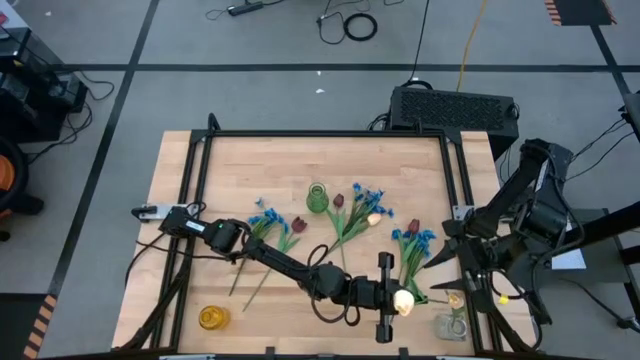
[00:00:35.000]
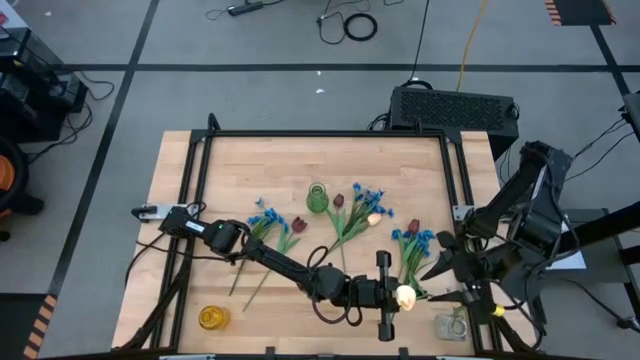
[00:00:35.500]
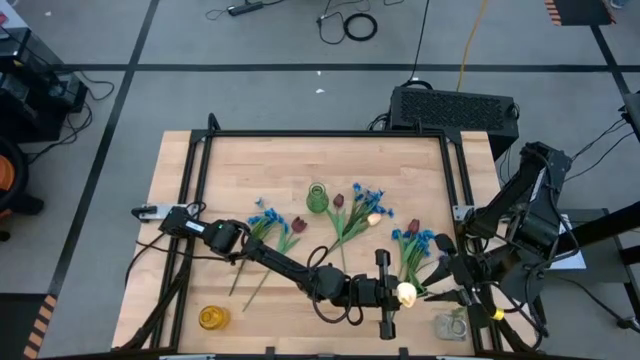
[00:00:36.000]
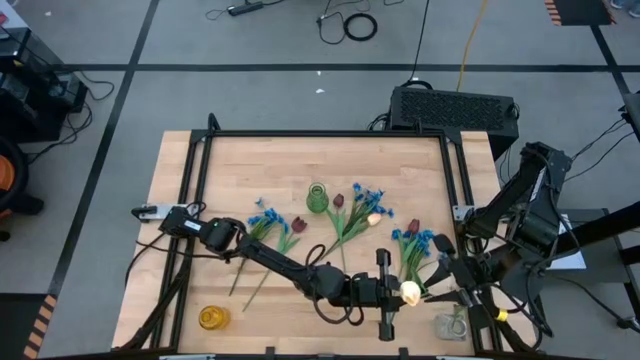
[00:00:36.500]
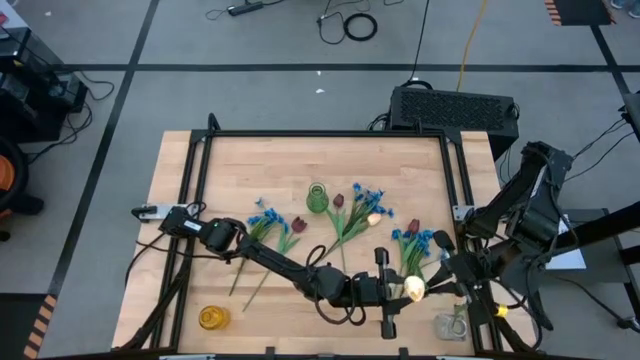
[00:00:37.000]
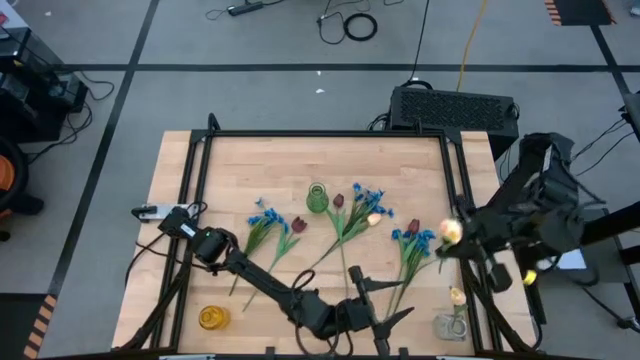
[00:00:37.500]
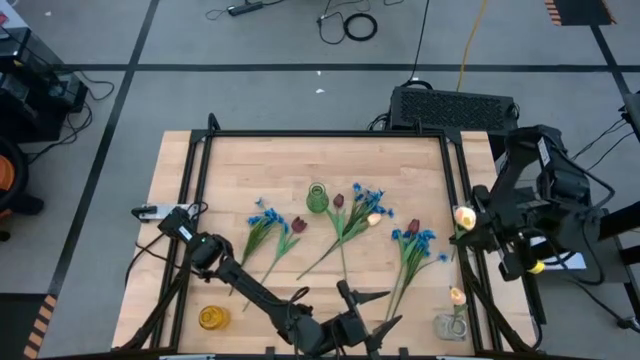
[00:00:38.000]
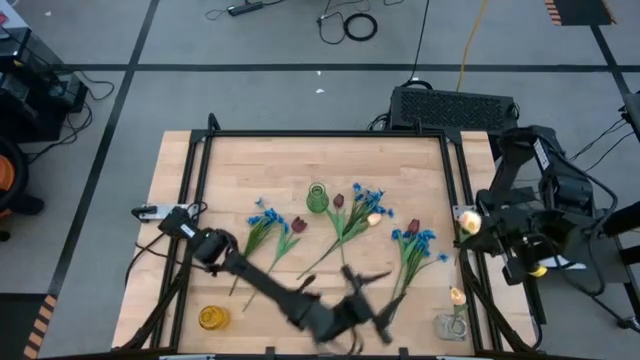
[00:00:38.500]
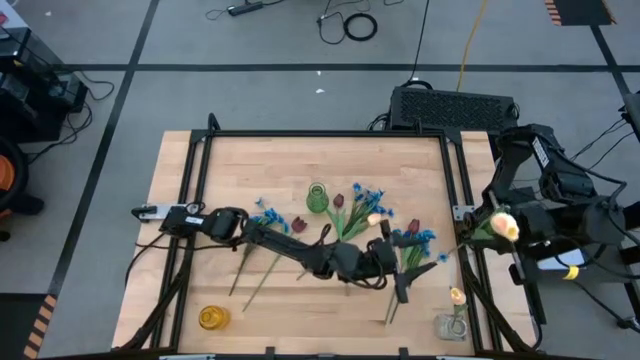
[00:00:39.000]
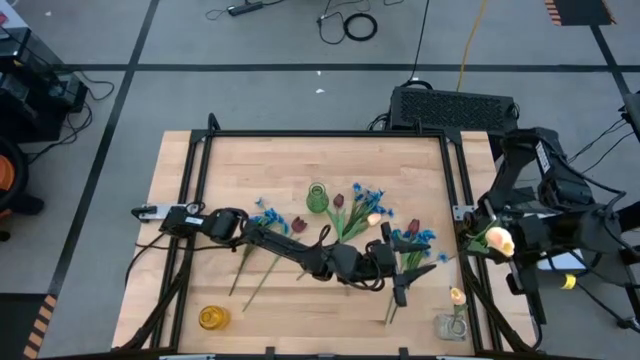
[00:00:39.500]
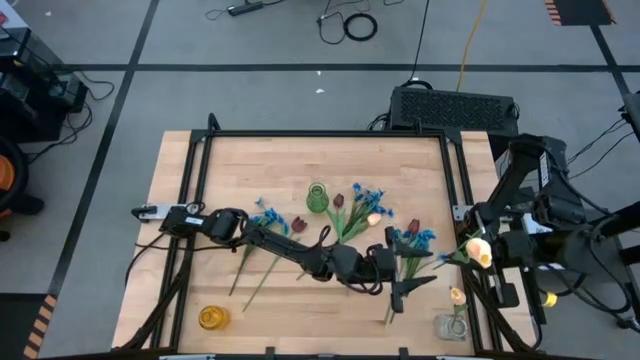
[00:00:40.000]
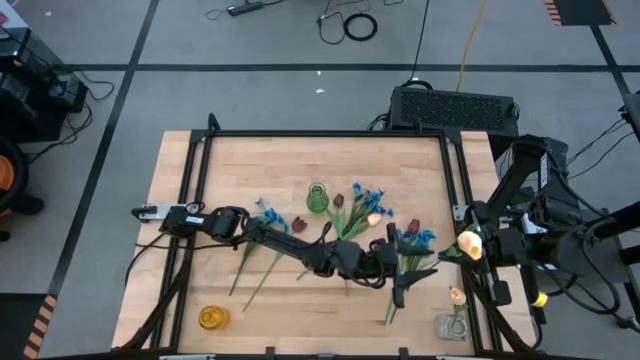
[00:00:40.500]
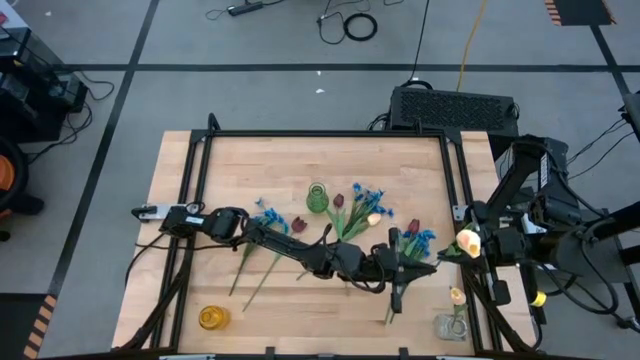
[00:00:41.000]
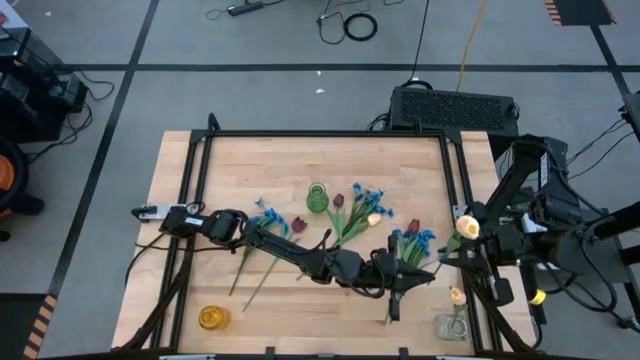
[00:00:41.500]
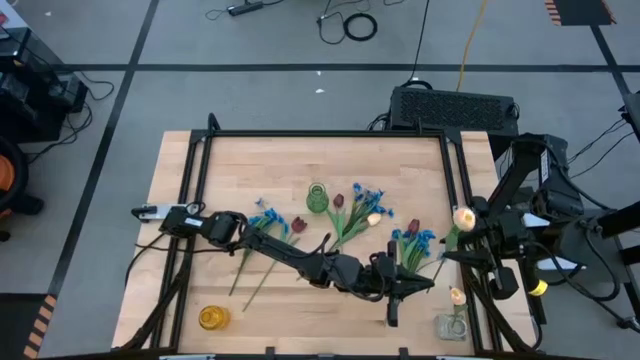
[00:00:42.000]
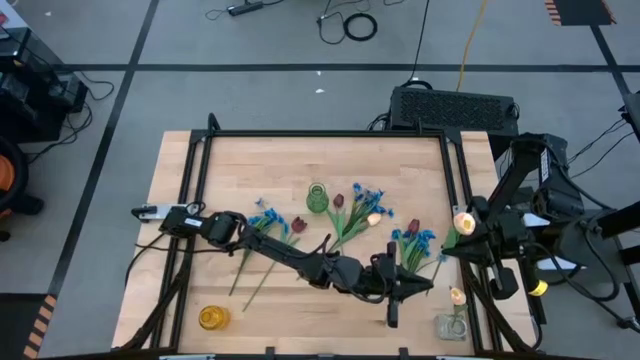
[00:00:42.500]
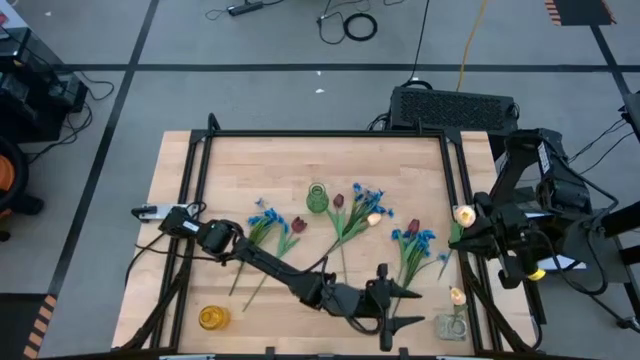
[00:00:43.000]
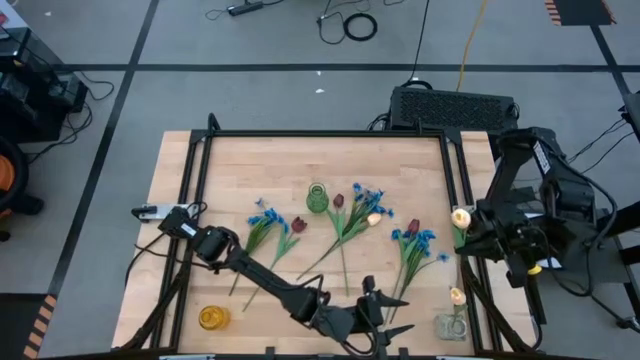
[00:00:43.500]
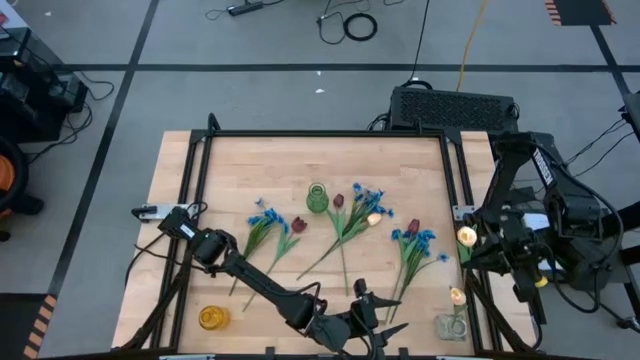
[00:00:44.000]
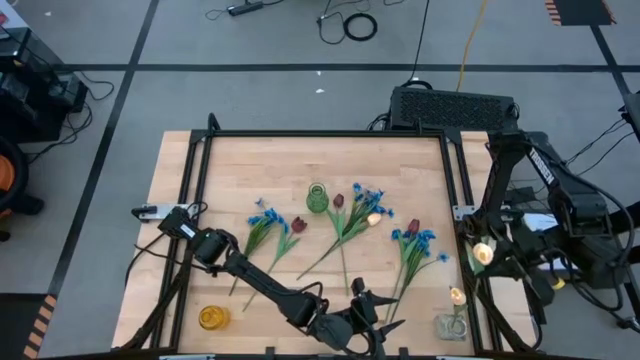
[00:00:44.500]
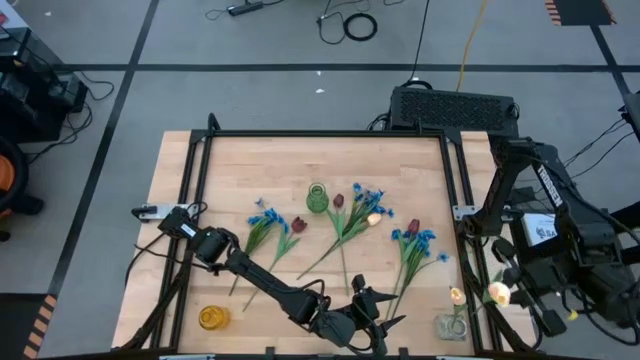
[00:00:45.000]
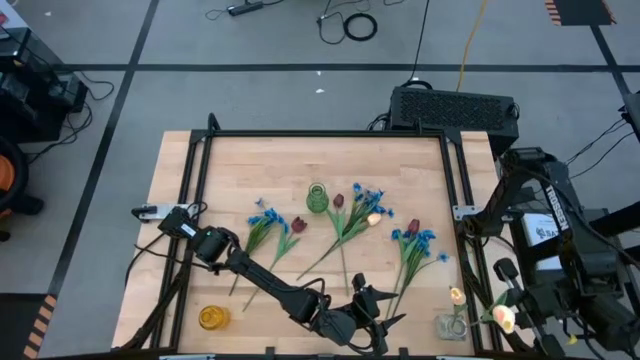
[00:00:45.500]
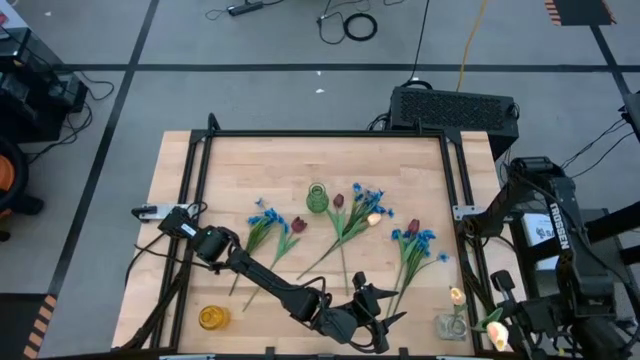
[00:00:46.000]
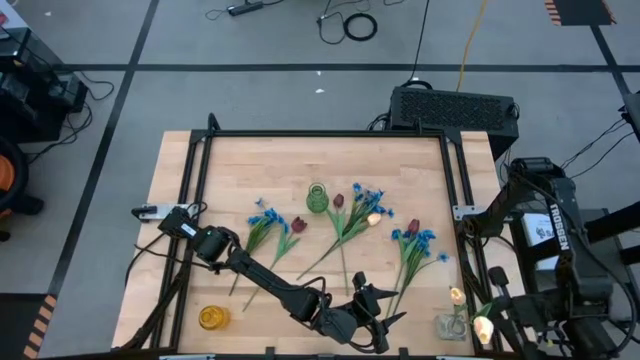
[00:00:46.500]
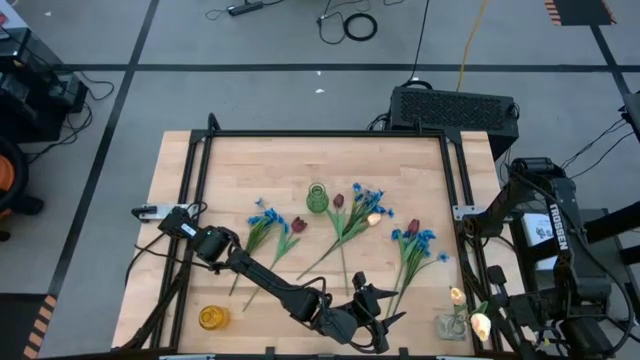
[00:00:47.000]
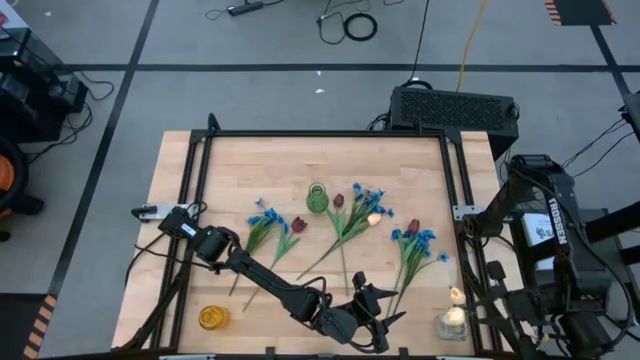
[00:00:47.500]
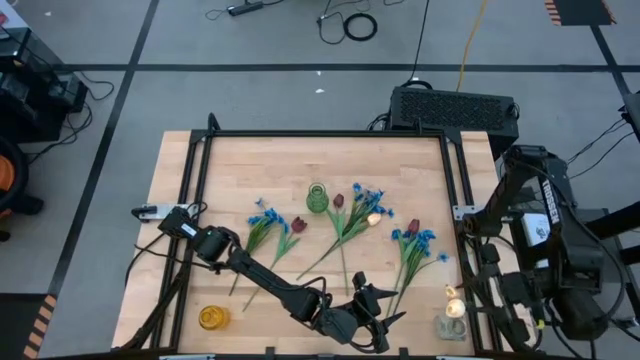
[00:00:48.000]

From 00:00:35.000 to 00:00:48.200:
Task: Sort flowers into vase by color
Put the bottom yellow flower into the transparent vase

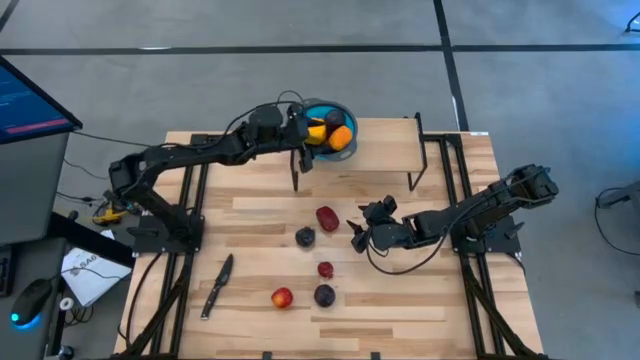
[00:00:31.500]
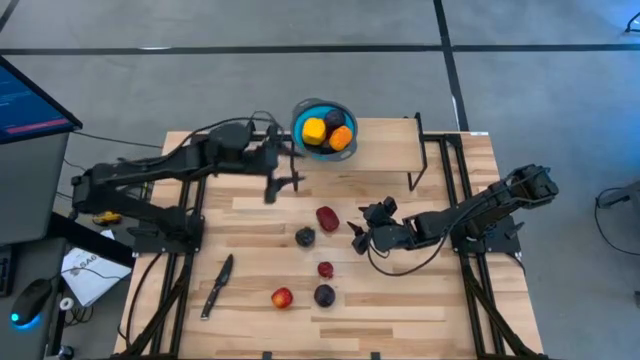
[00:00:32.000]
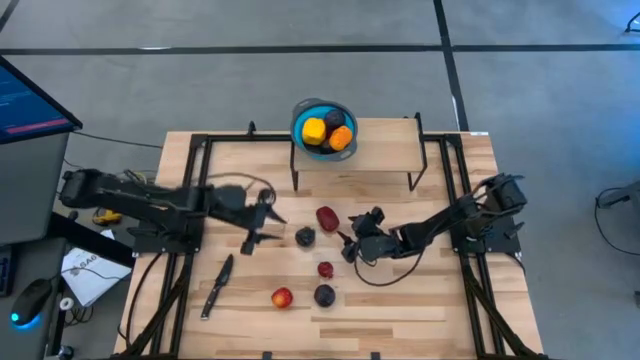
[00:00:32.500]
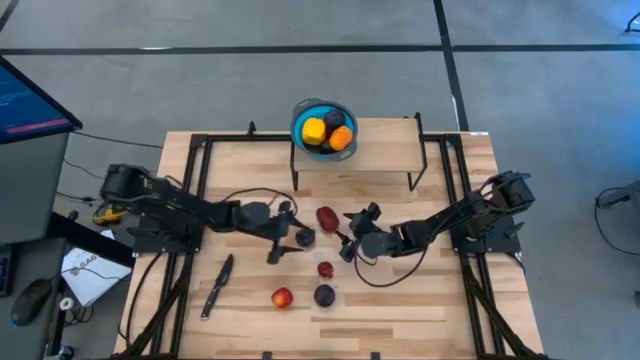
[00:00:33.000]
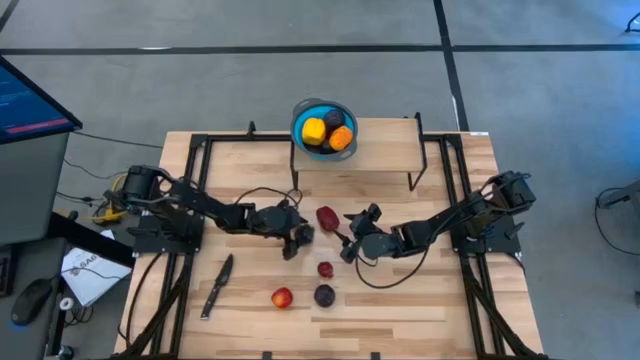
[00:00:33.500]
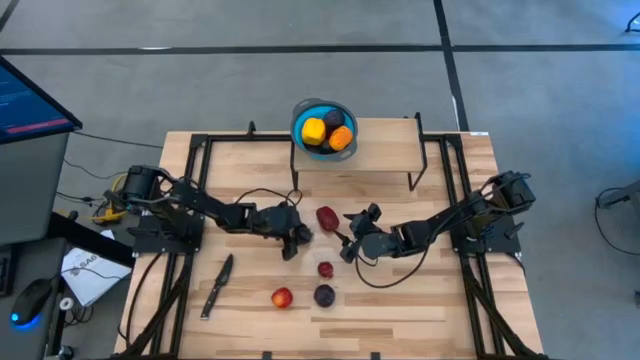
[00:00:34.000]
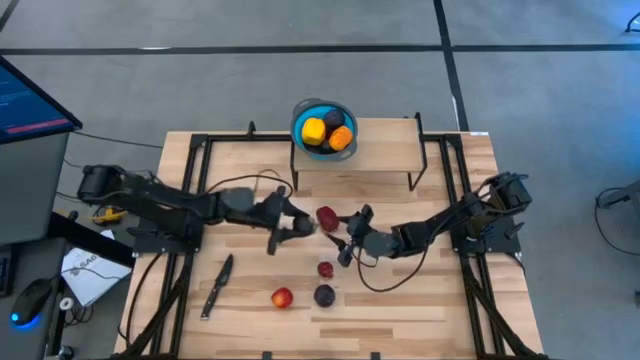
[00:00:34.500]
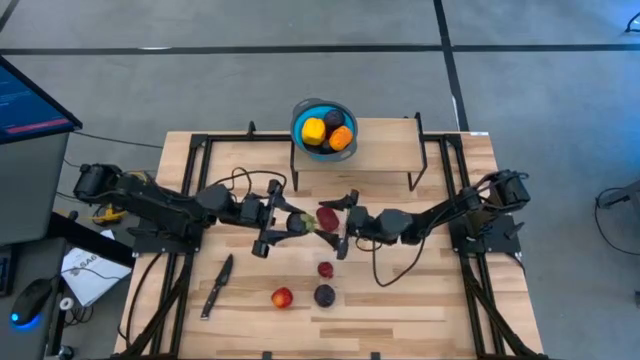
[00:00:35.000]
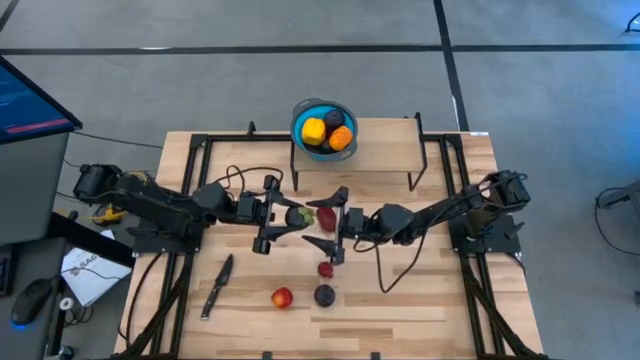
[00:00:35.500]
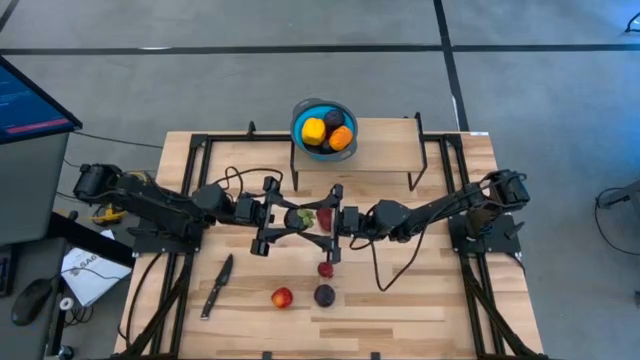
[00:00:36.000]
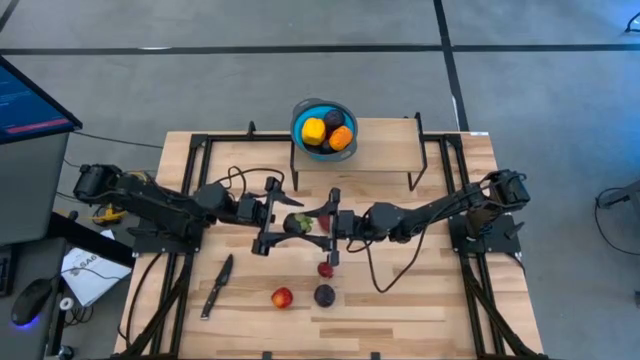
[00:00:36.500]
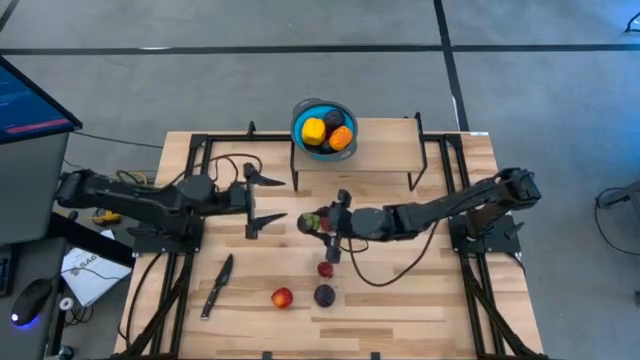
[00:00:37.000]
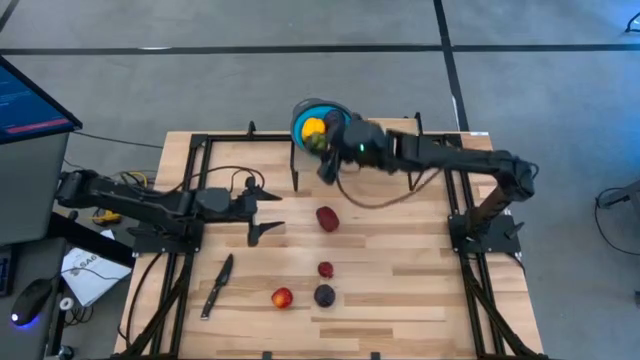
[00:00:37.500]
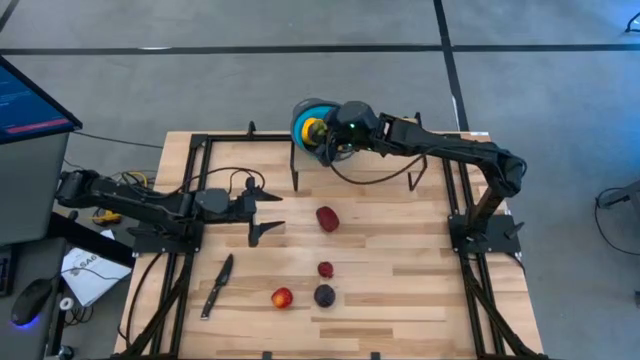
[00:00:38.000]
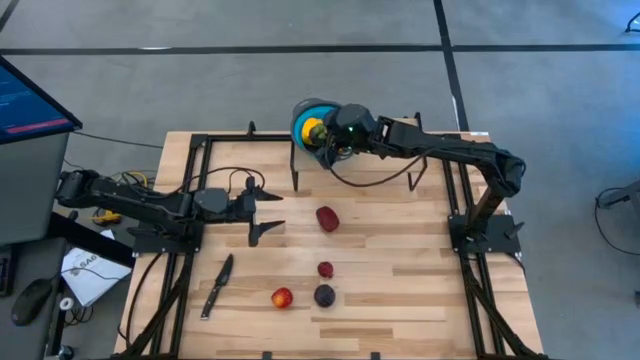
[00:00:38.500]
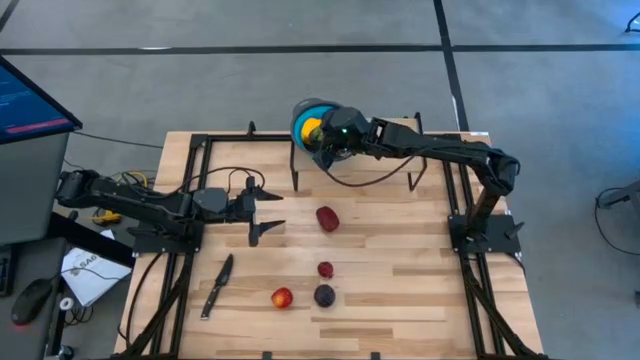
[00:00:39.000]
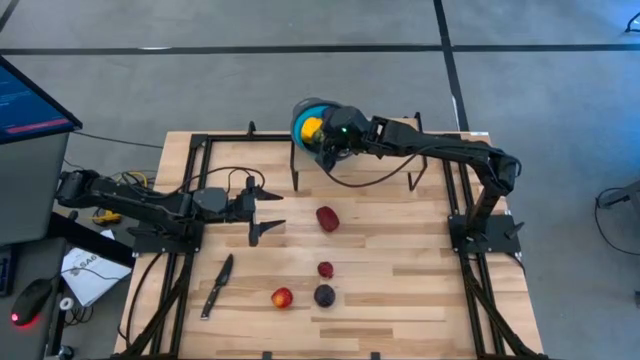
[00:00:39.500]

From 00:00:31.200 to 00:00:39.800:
Task: Pick & Place Fruit
Put the purple mangosteen into the blue strainer bowl on the shelf
